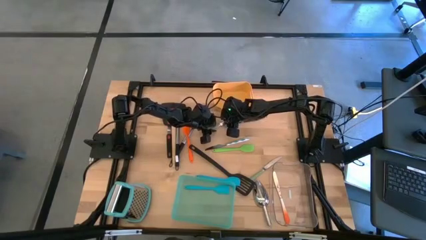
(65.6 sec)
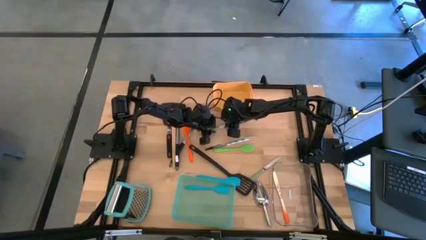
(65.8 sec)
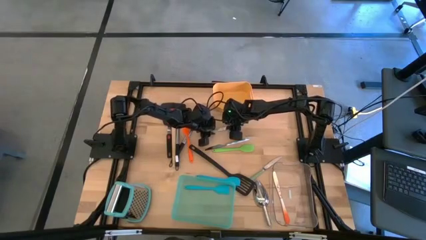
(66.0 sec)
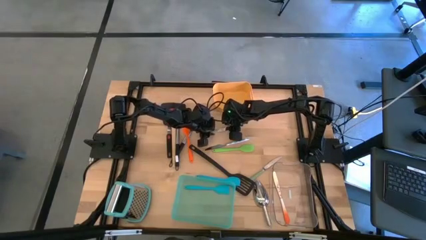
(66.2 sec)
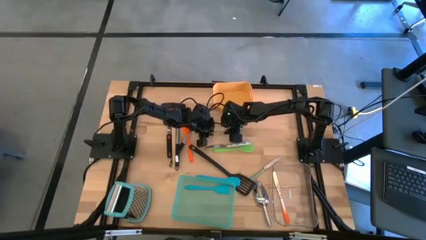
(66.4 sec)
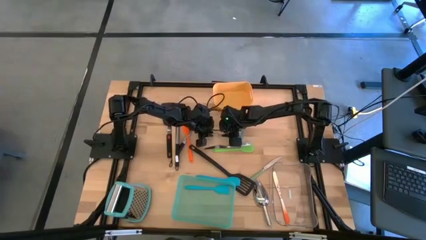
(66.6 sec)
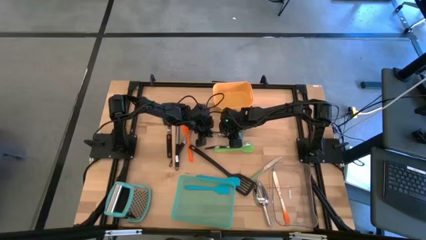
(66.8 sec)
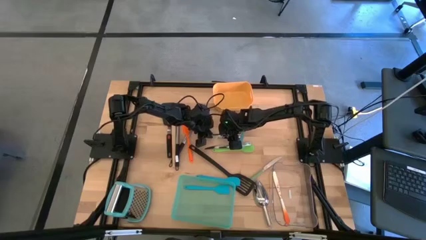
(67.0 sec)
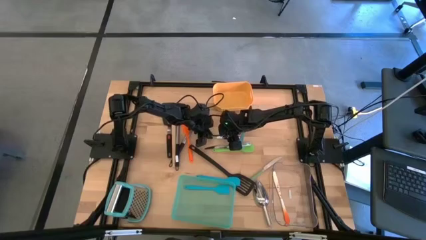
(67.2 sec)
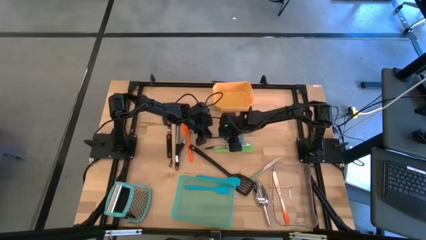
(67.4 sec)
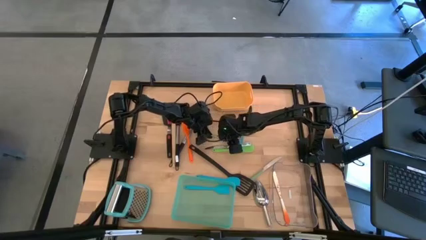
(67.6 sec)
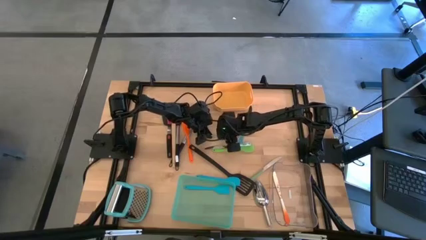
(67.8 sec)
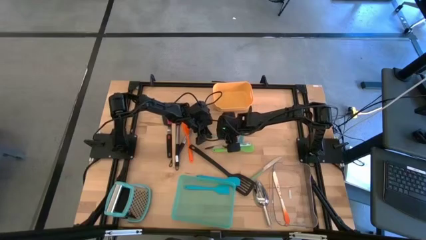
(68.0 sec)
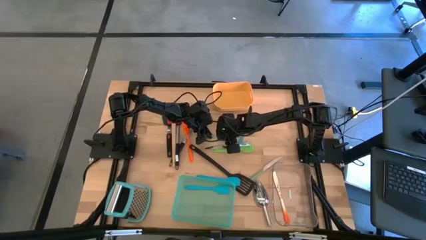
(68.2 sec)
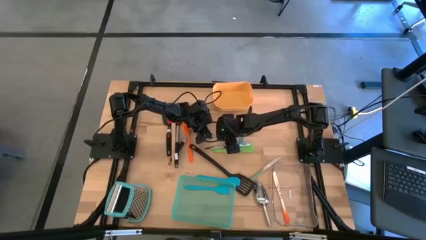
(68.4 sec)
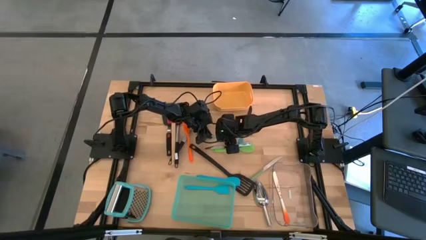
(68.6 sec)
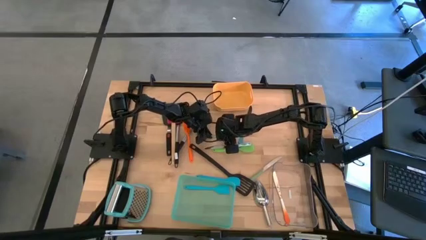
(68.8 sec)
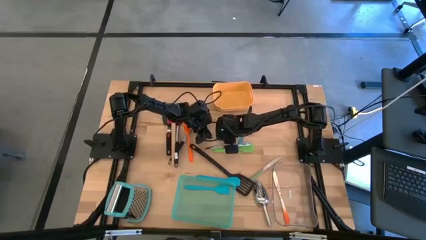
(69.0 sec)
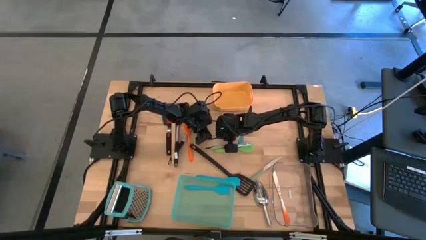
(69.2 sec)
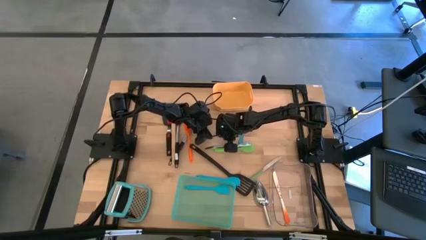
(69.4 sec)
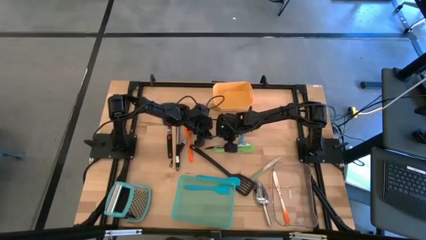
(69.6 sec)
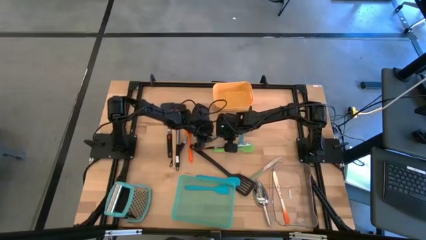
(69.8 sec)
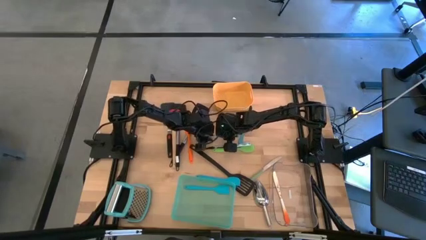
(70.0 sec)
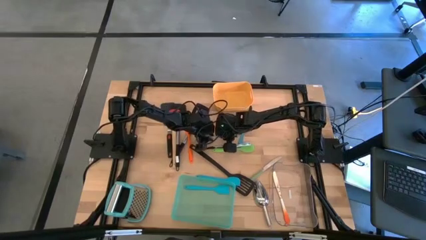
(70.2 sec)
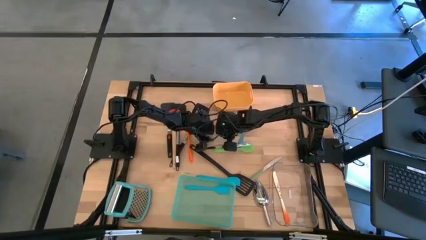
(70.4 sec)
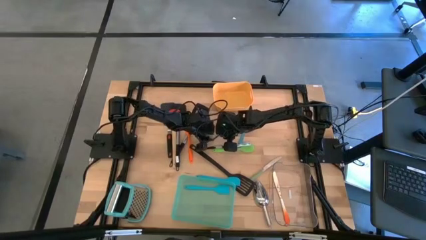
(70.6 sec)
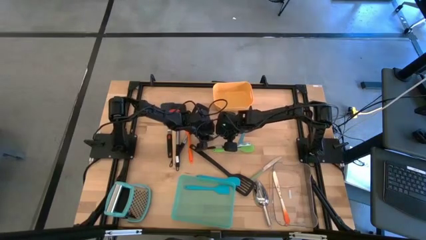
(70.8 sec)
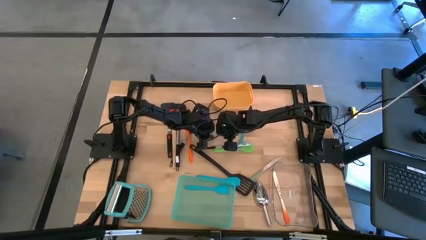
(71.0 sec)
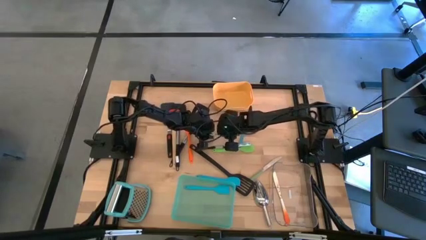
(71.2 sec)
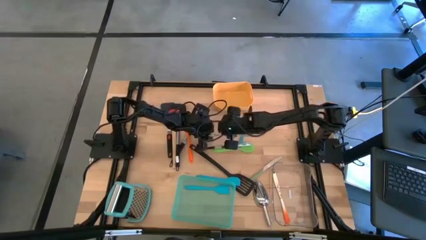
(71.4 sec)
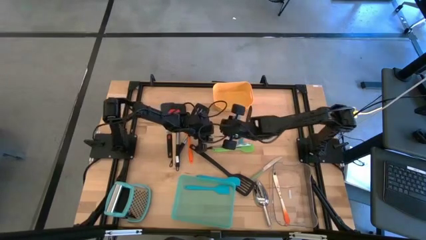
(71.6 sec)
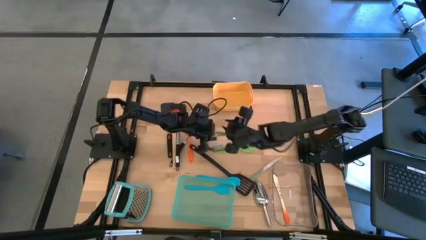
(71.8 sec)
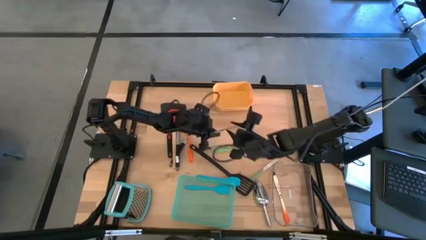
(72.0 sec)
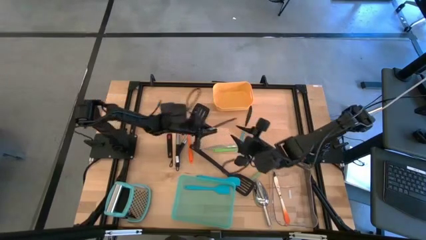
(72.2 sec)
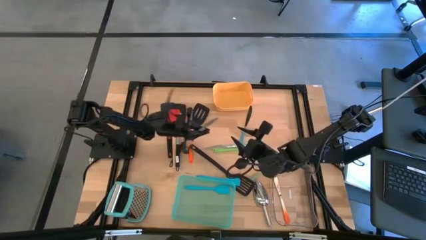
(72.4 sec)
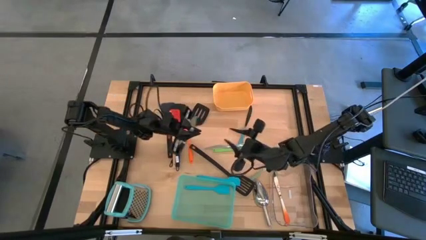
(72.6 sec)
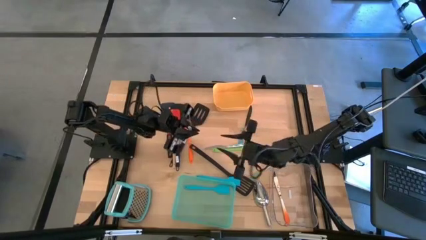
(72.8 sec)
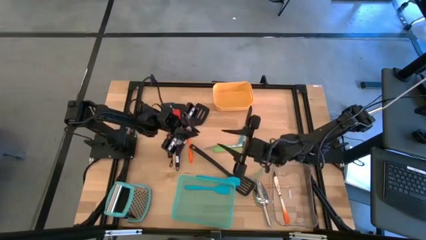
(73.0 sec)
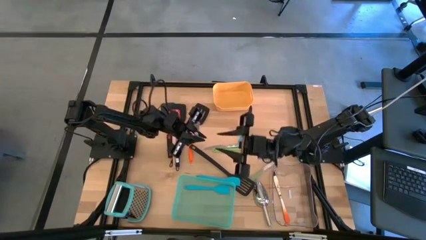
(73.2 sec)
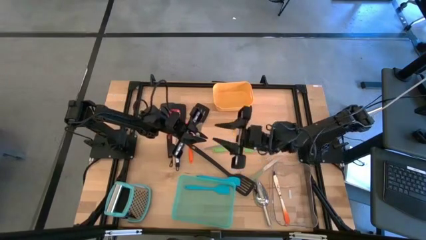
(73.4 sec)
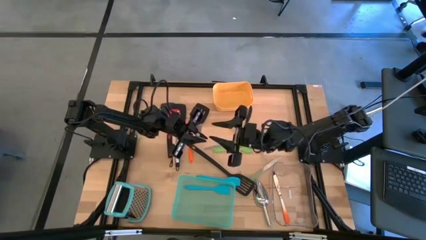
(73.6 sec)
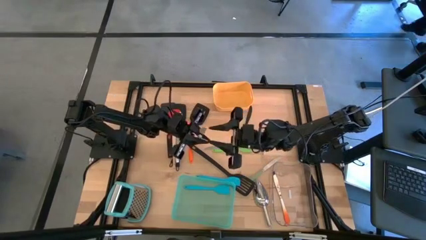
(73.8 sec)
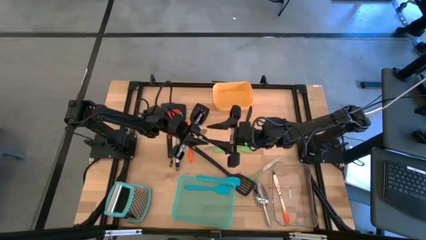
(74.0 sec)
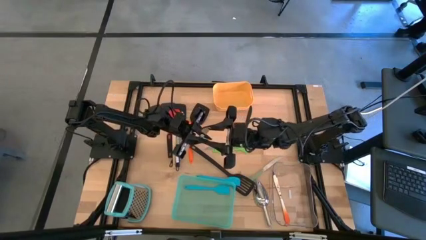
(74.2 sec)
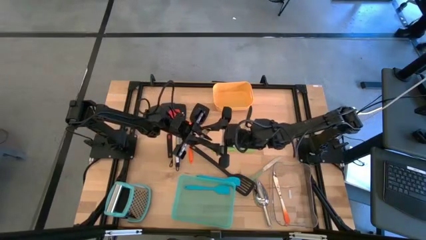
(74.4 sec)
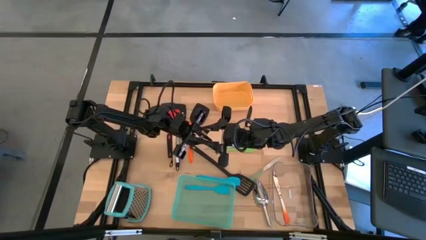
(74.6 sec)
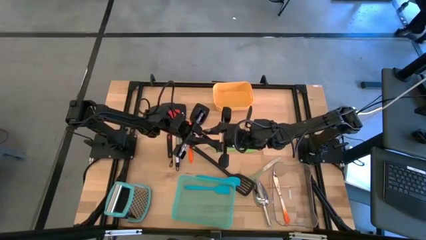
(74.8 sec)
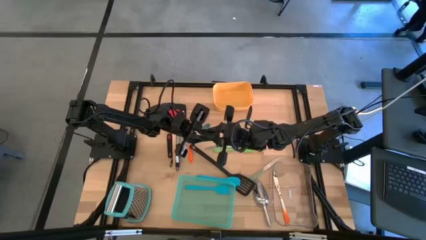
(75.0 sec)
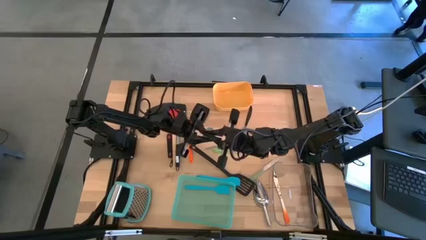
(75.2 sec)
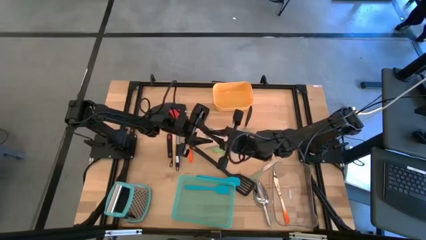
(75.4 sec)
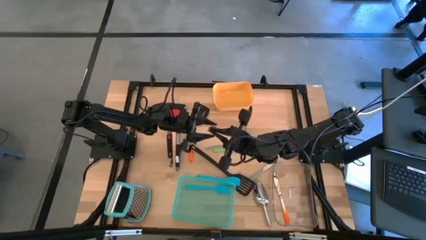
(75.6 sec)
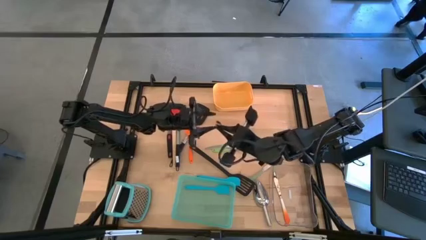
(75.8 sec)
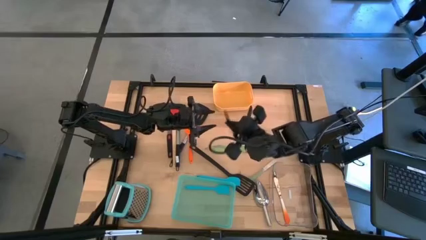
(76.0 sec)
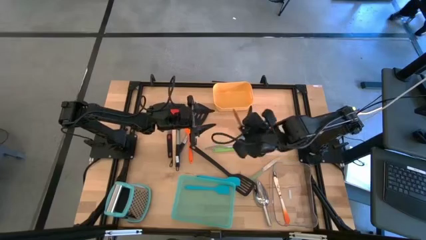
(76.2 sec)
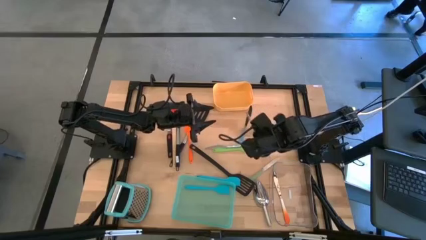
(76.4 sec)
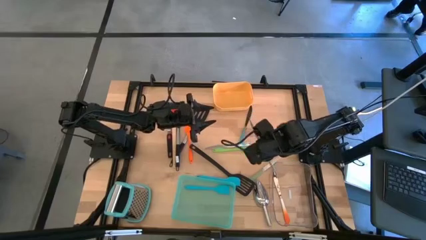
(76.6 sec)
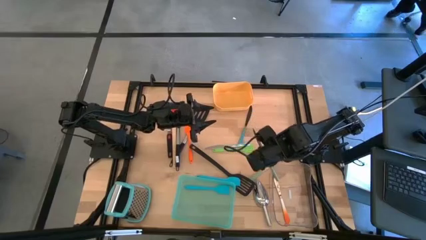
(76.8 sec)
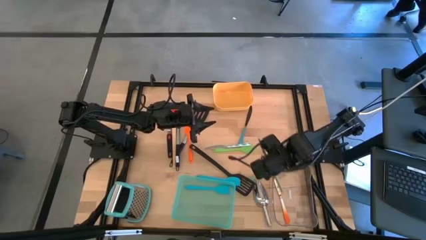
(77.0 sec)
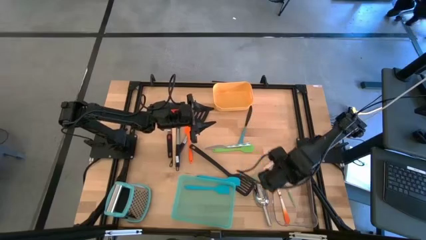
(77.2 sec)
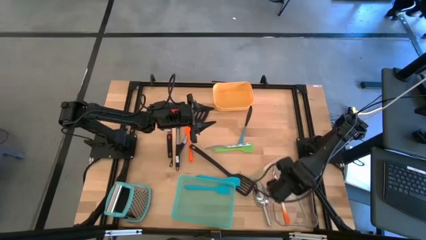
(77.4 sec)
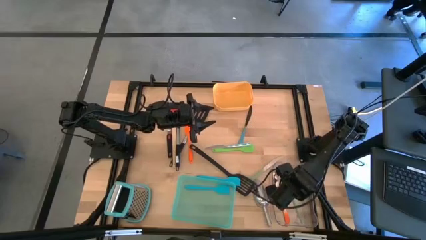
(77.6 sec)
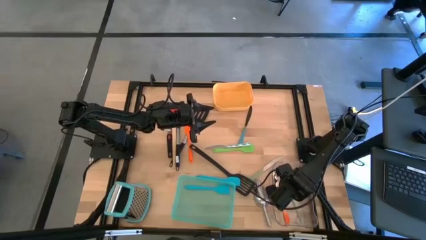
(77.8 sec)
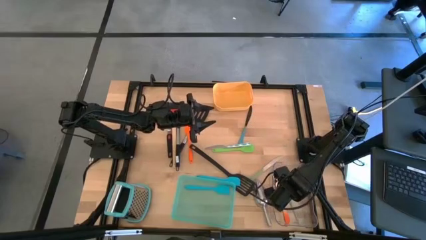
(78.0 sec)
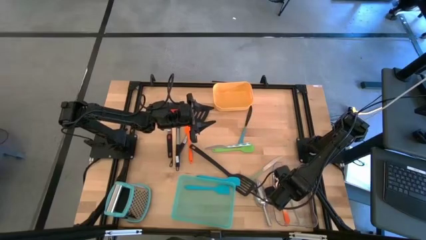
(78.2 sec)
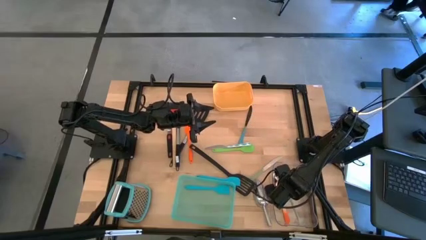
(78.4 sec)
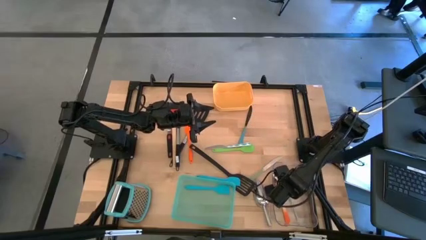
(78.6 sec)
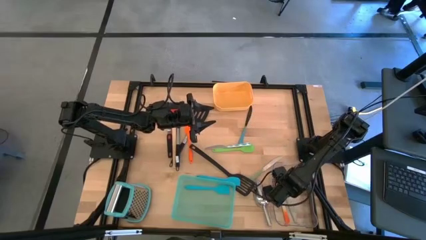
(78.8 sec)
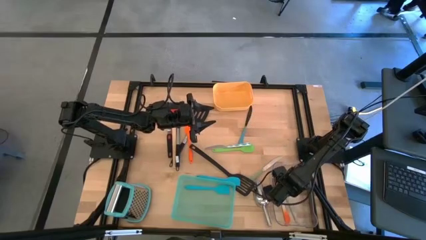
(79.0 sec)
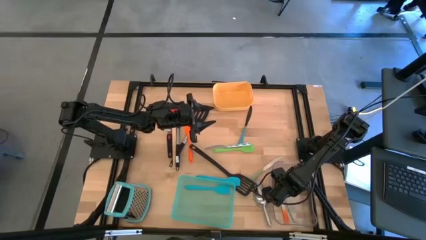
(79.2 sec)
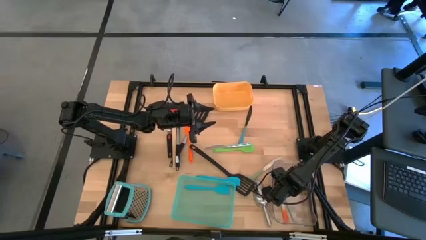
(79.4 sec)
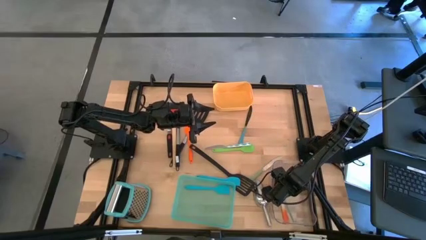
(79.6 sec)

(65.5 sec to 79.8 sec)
Task: Pick & Place Kitchen Items
Put the green table knife into the transparent bin
